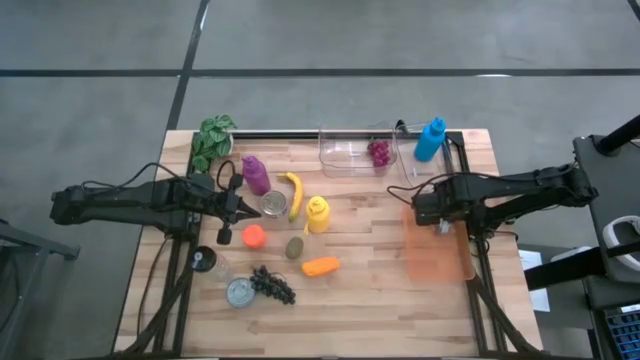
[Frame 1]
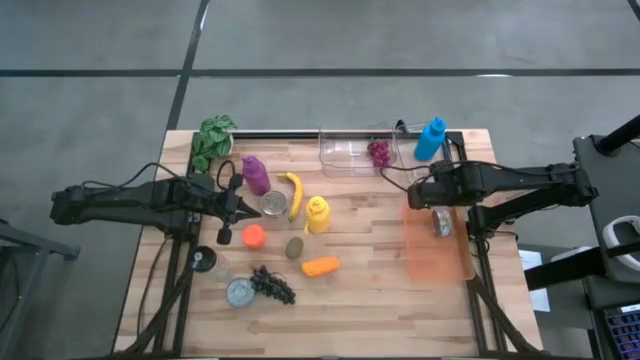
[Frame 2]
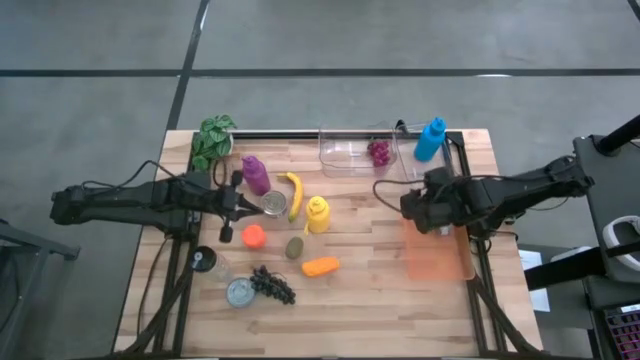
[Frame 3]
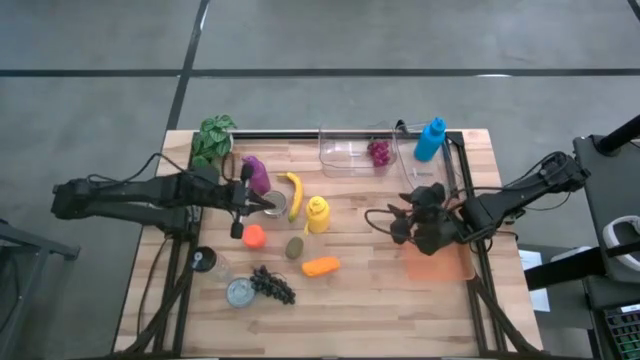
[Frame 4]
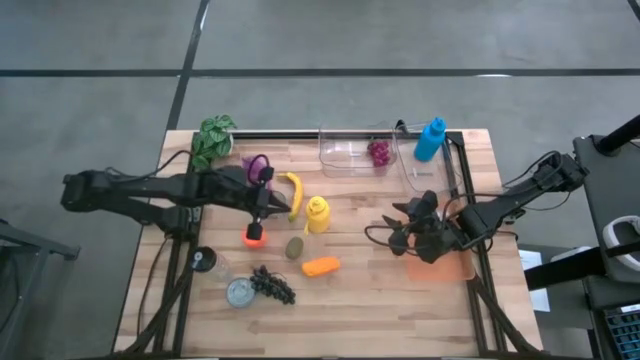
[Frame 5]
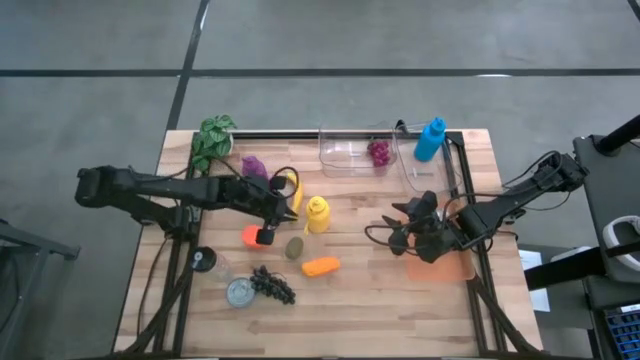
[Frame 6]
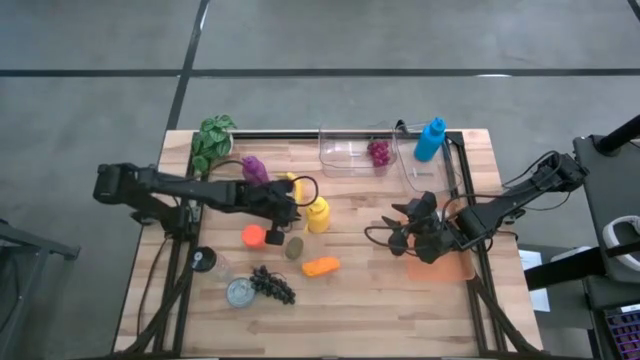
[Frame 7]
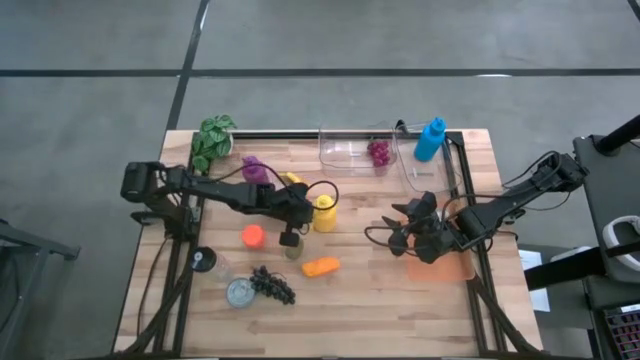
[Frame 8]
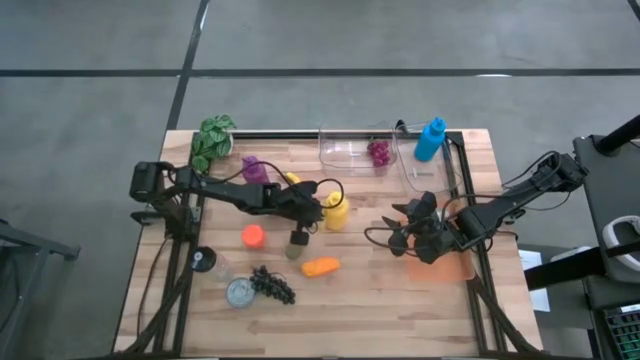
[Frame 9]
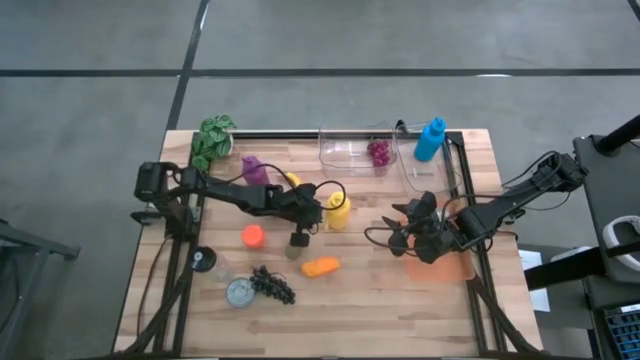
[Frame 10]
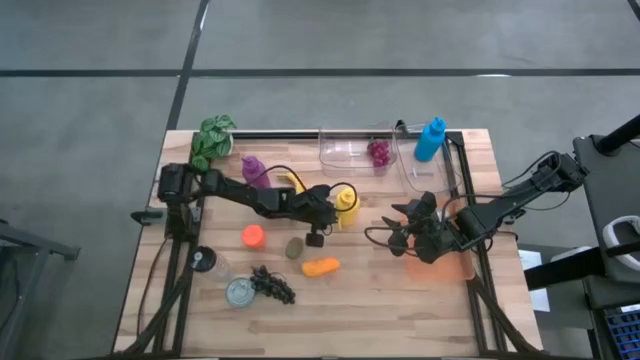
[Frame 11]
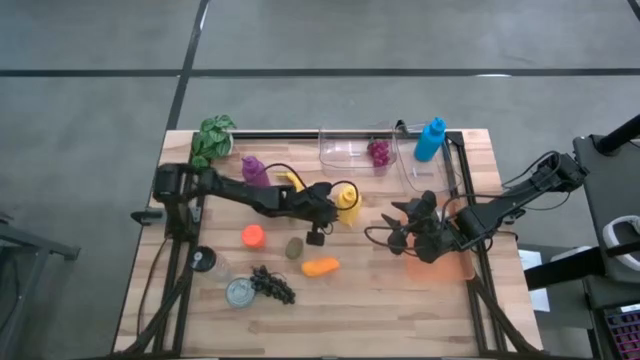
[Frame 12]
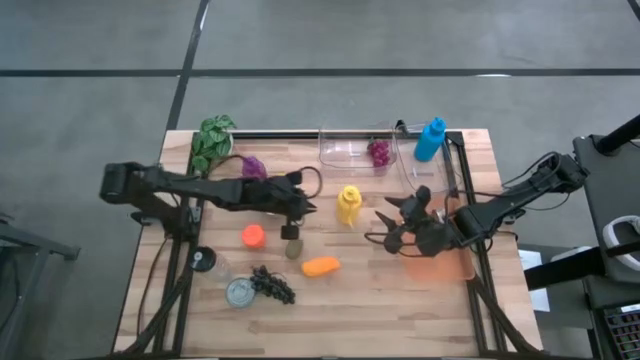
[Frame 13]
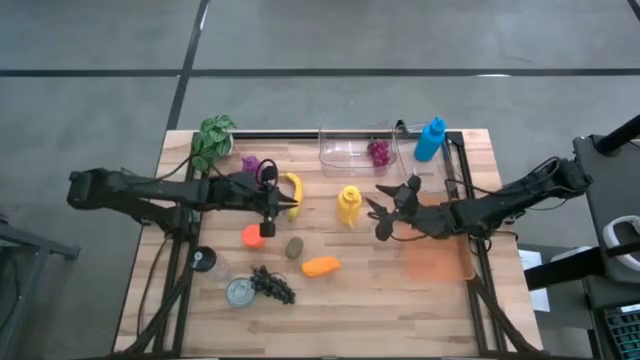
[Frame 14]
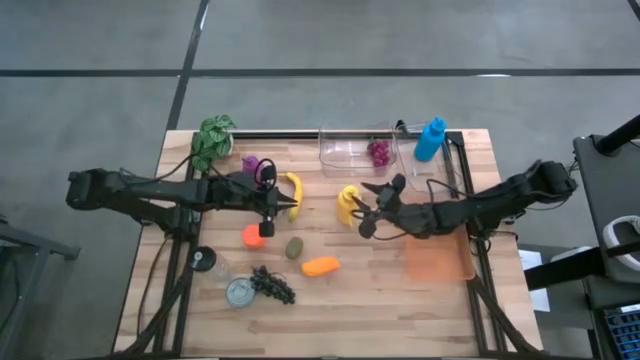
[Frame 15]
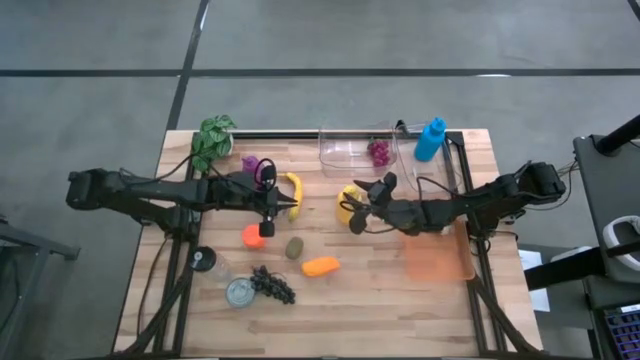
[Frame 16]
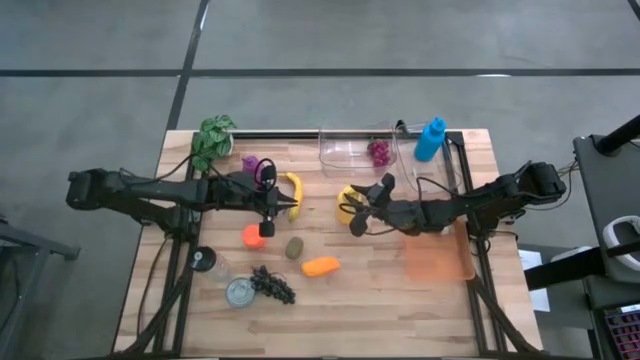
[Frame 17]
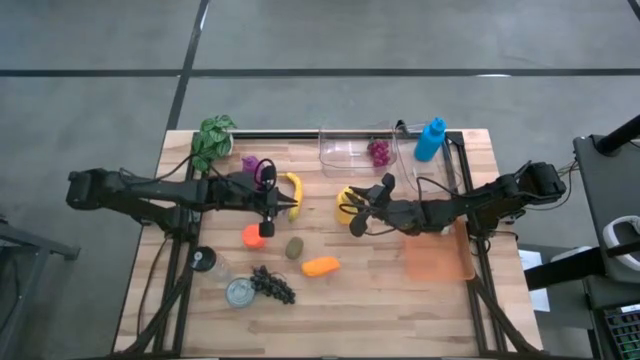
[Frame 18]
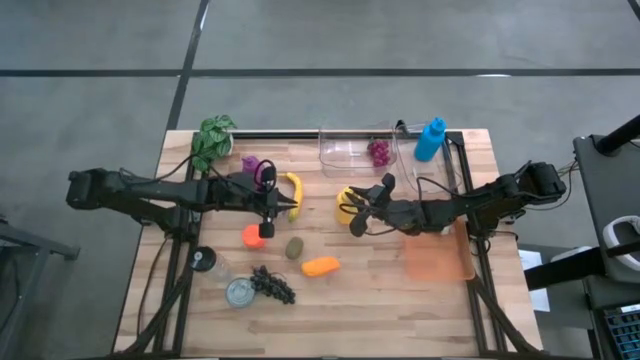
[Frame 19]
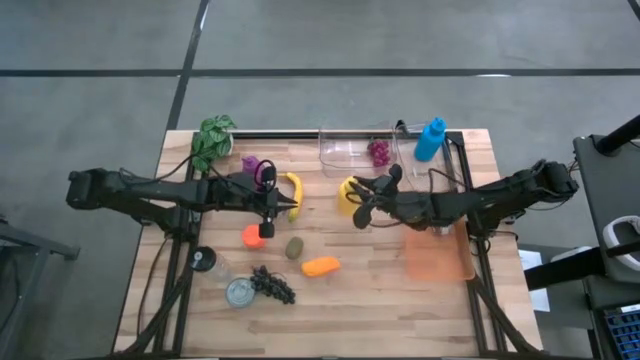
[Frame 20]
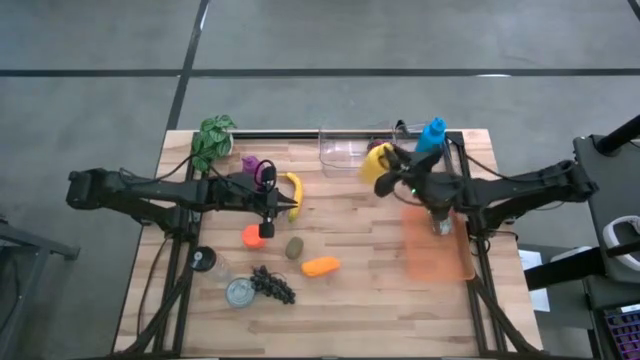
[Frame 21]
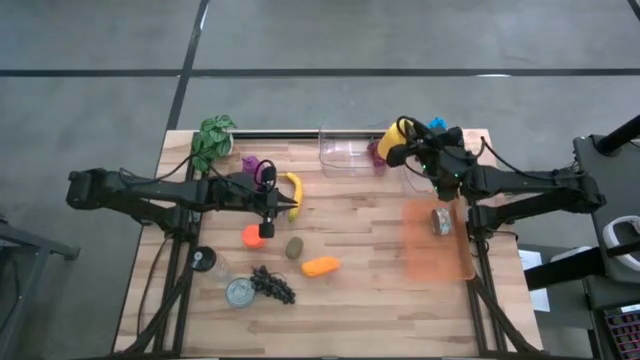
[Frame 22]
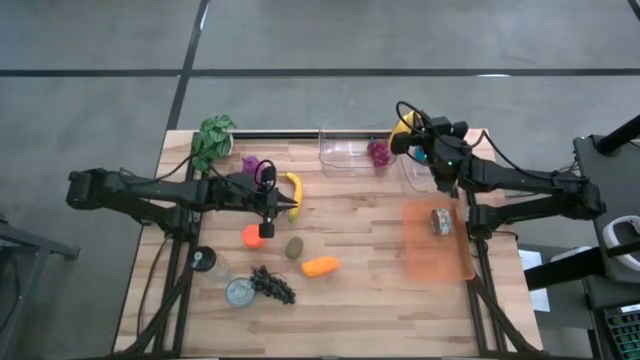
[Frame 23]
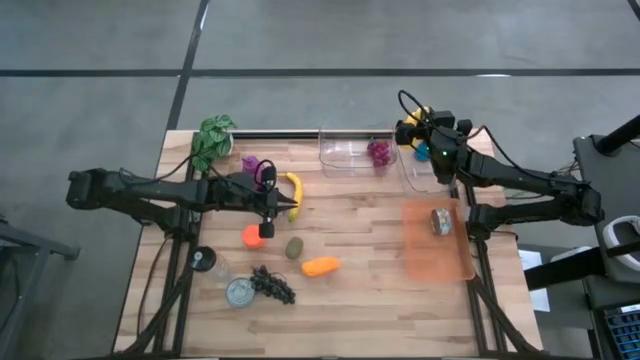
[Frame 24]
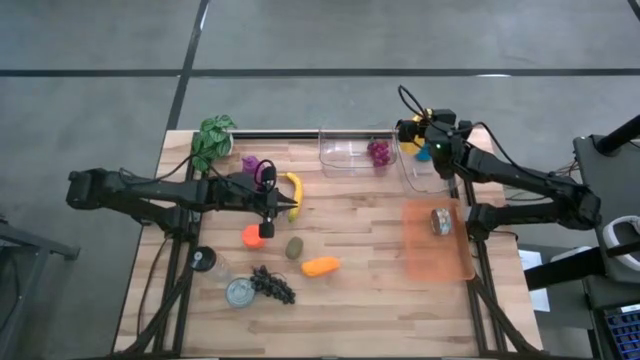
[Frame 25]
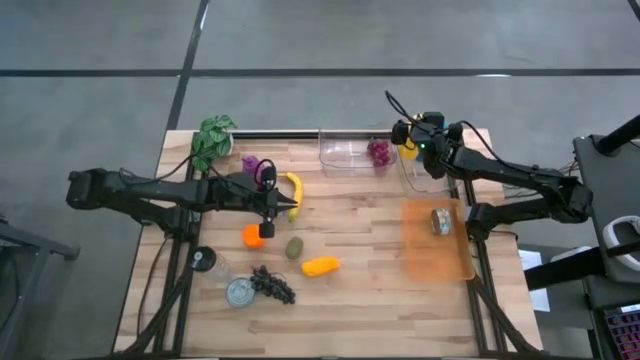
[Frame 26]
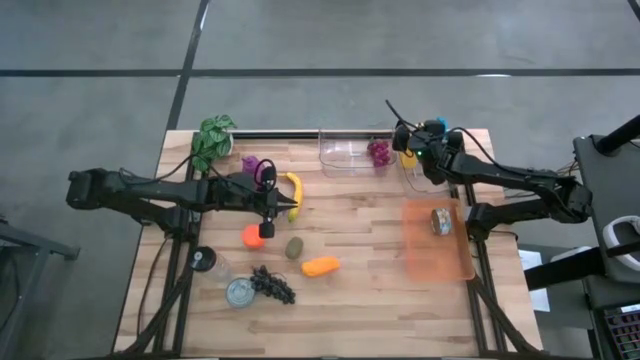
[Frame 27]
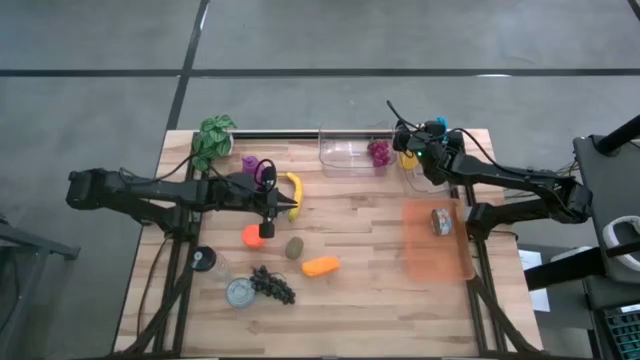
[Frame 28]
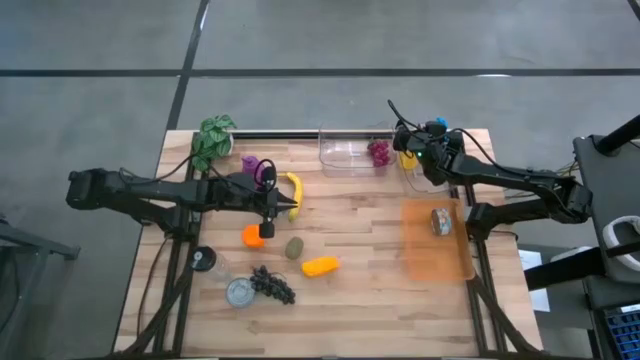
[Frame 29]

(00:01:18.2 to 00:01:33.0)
Task: Pick & Place Food Item
Put the yellow water bottle into the right transparent bin
